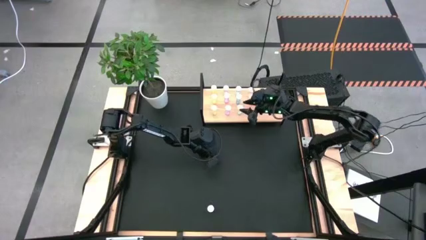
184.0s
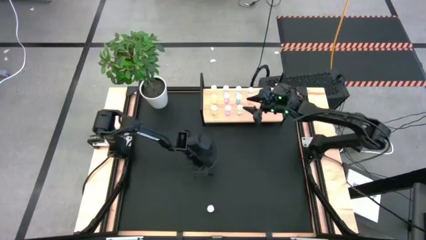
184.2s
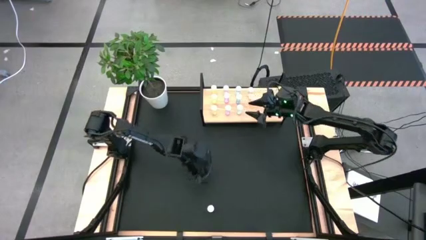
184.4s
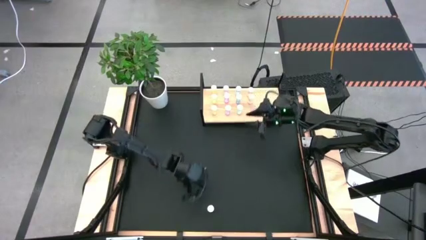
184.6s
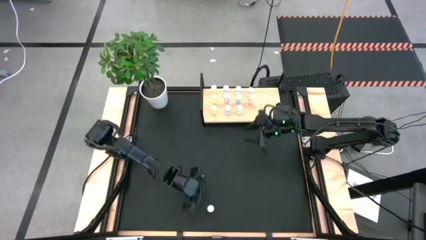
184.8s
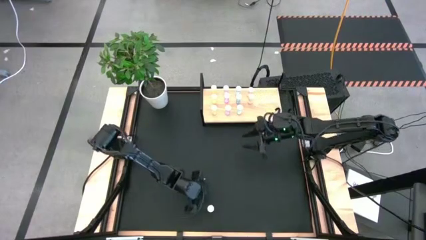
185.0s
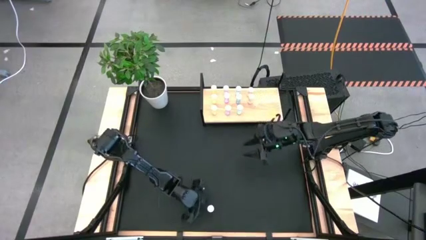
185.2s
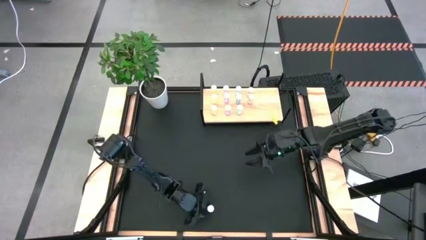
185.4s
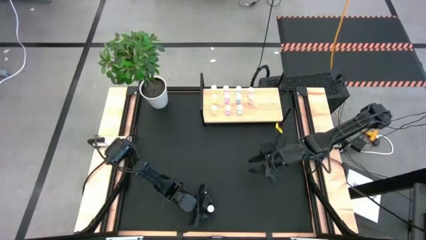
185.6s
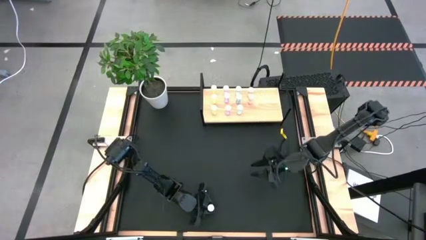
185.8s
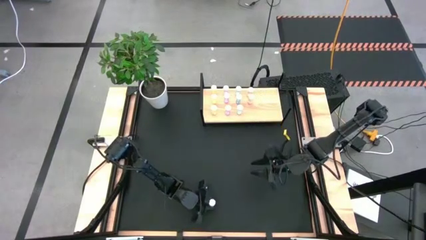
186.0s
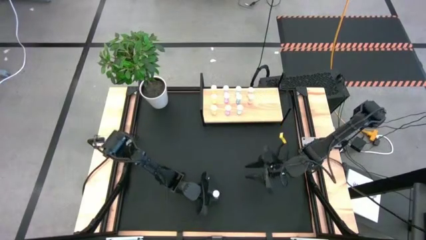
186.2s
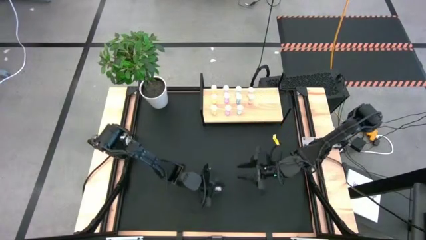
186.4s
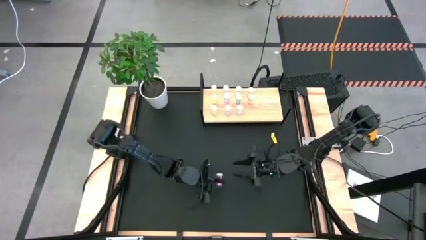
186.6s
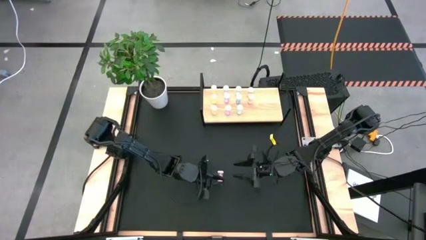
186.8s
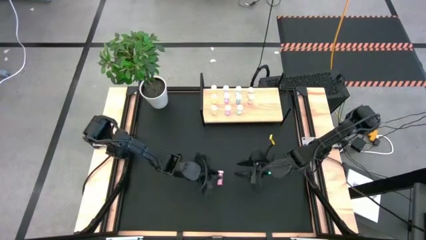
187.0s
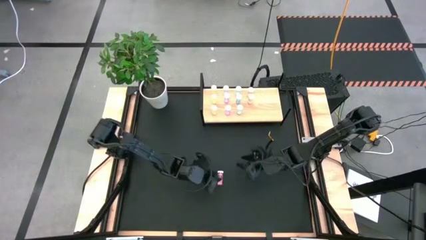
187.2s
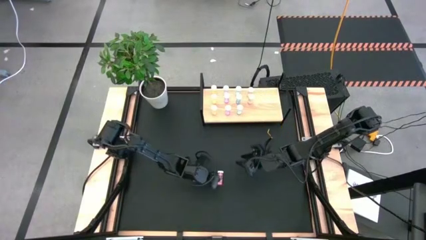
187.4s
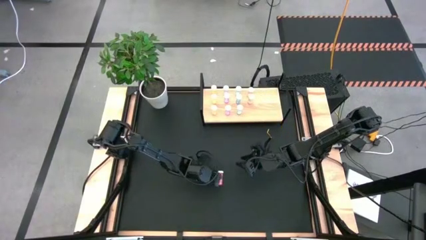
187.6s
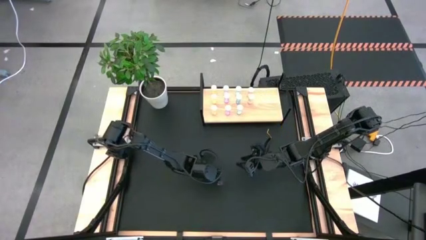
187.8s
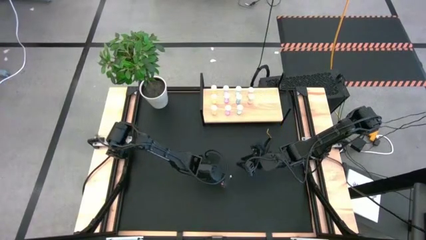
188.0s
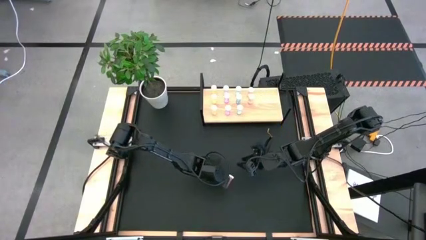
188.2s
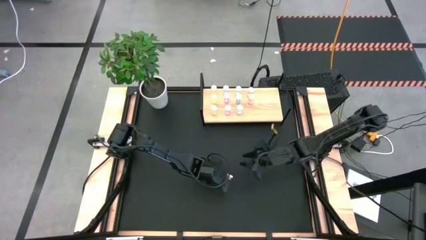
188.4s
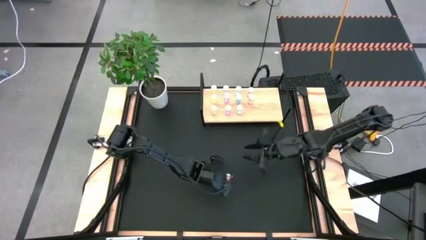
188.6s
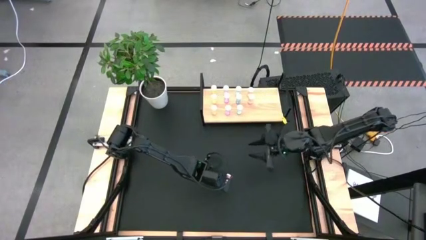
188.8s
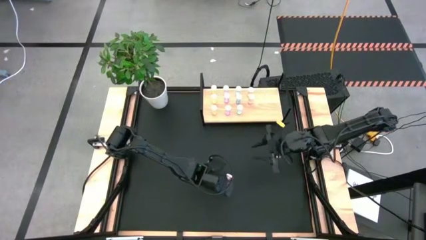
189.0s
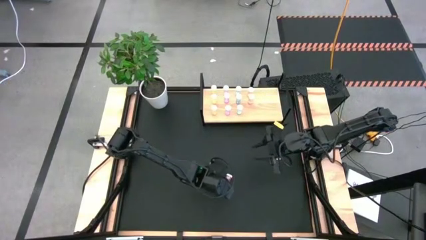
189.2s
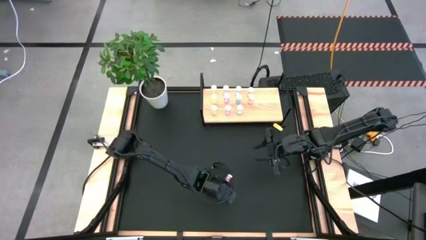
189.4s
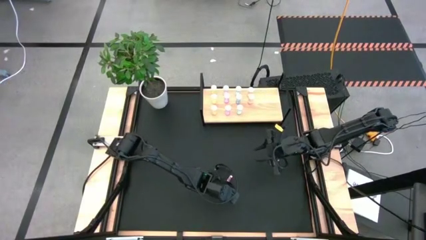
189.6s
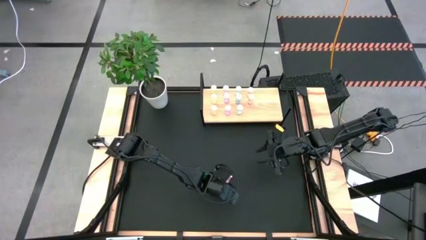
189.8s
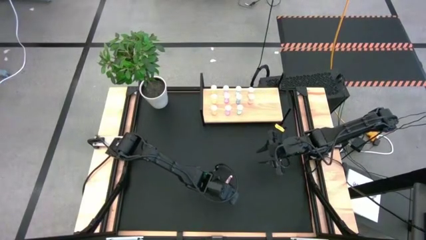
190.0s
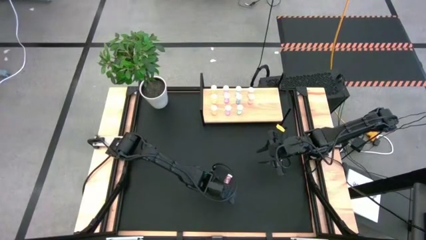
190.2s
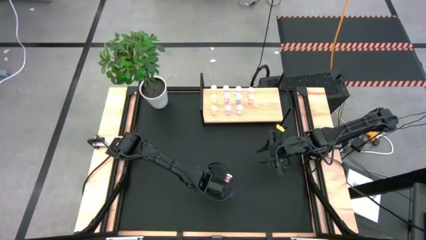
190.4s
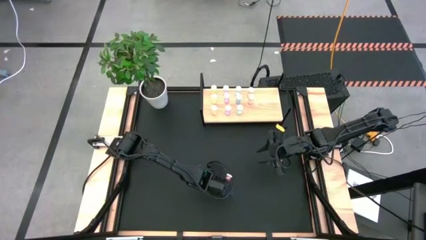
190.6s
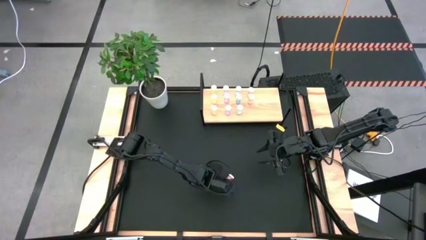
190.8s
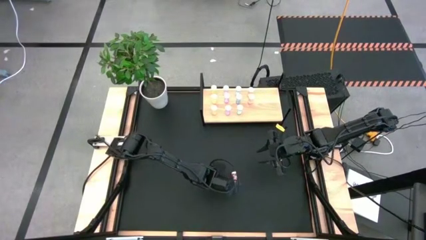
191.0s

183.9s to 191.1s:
Task: Pick and place medicine bottles onto shelf by color
Put the orange pill bottle on the shelf aligned with the other orange pill bottles

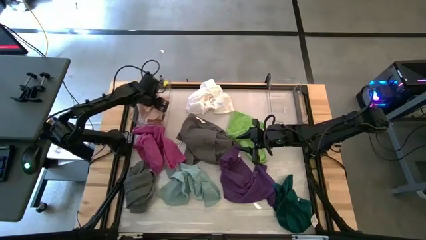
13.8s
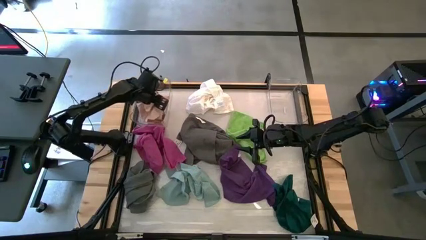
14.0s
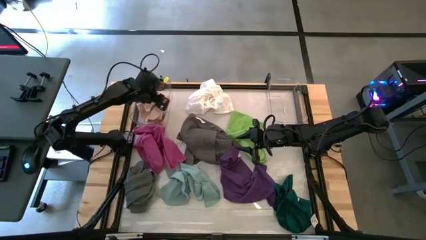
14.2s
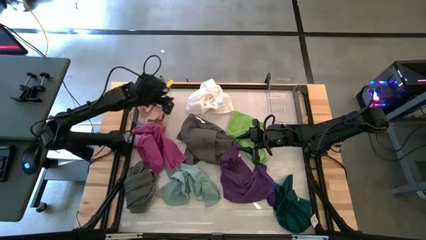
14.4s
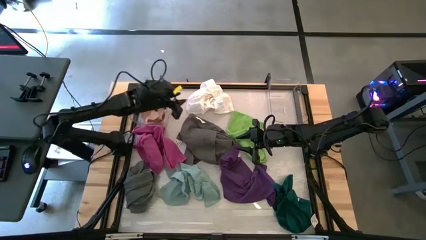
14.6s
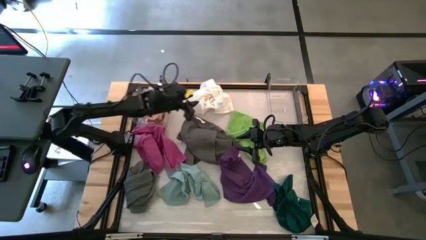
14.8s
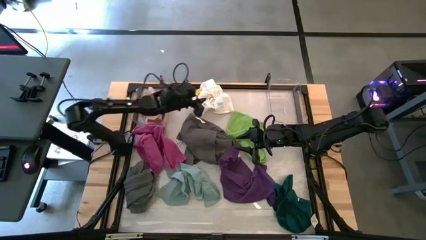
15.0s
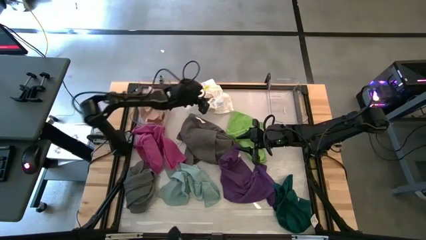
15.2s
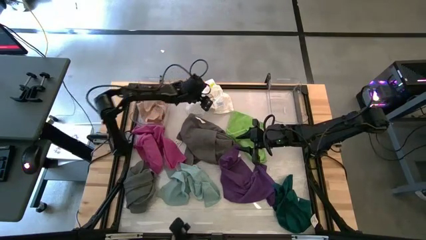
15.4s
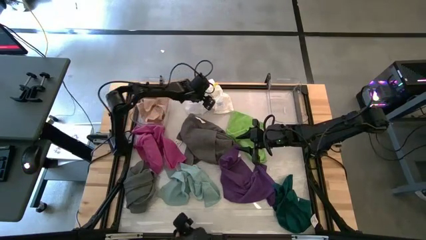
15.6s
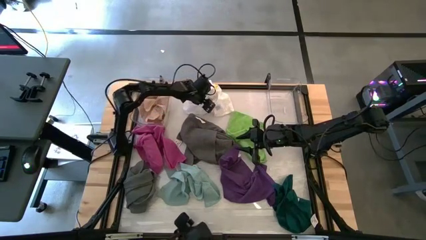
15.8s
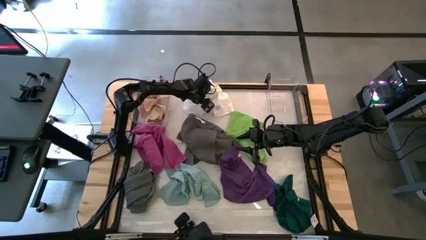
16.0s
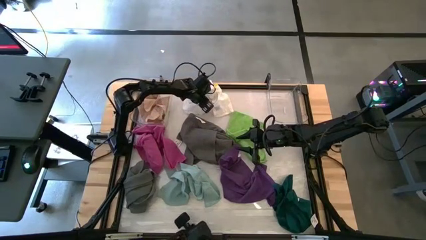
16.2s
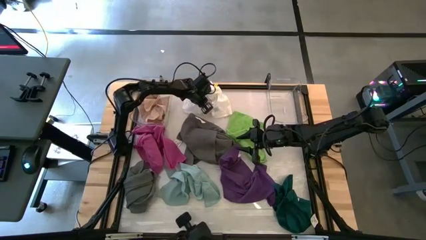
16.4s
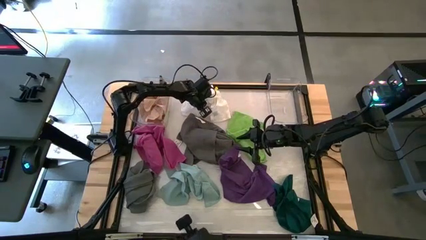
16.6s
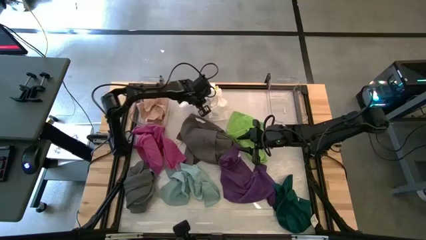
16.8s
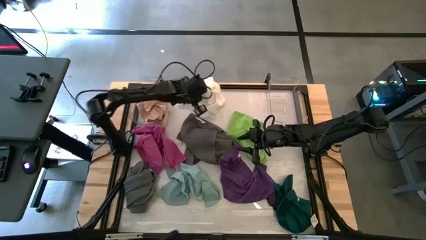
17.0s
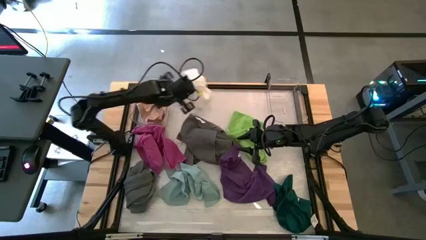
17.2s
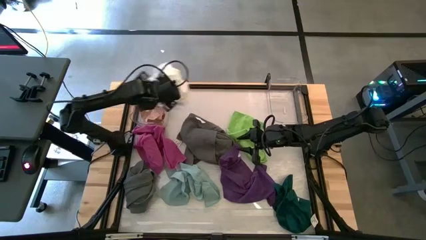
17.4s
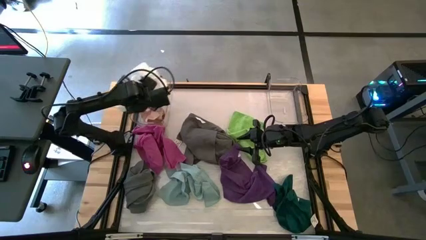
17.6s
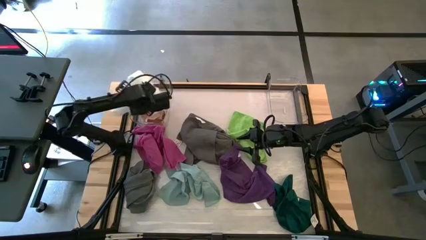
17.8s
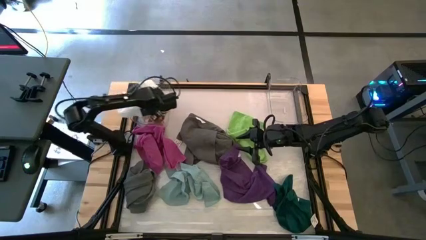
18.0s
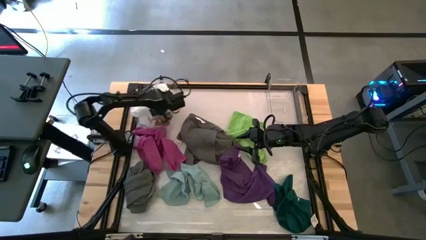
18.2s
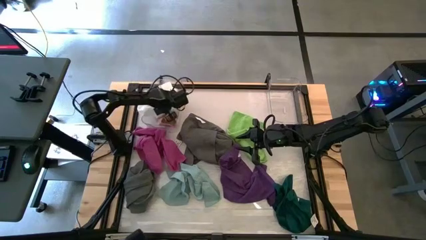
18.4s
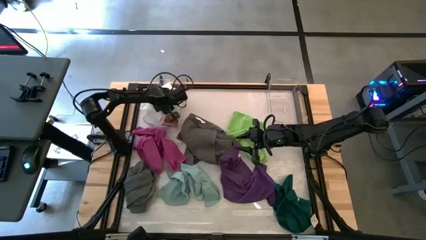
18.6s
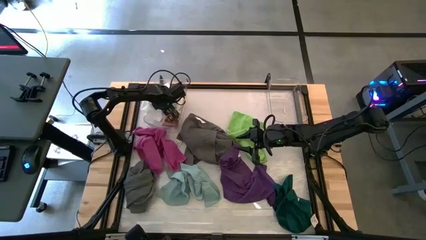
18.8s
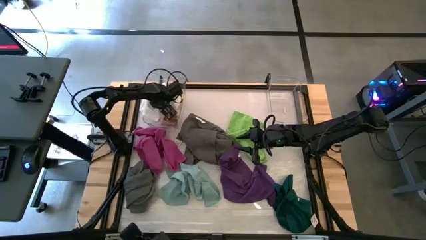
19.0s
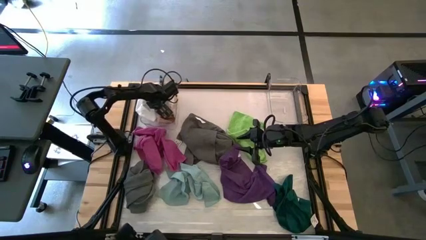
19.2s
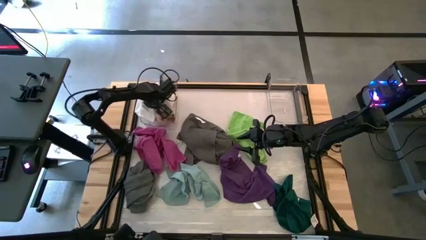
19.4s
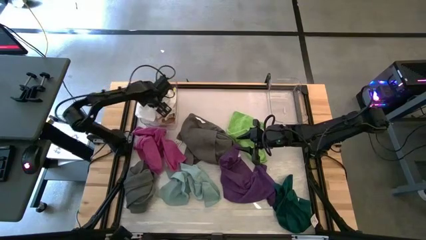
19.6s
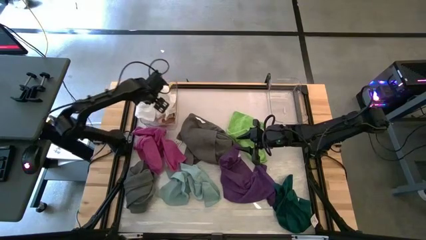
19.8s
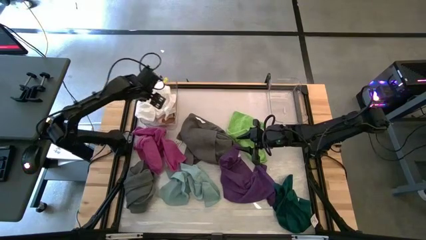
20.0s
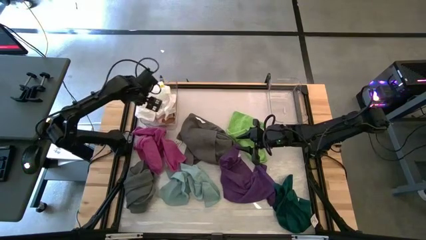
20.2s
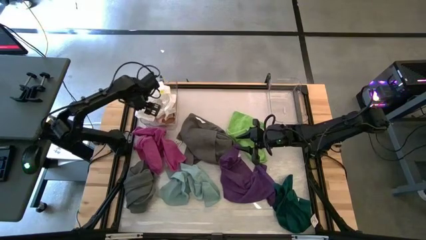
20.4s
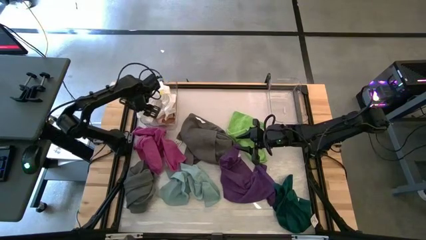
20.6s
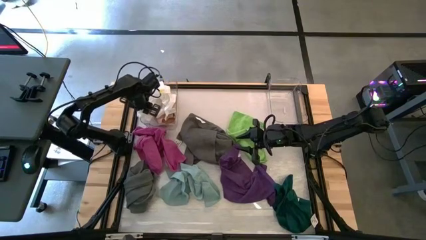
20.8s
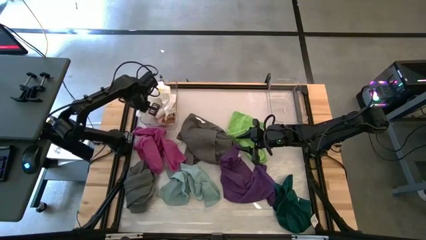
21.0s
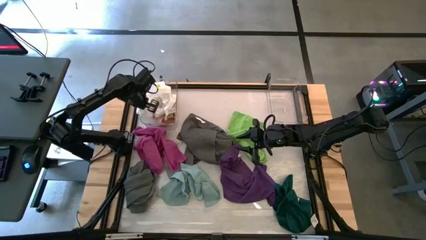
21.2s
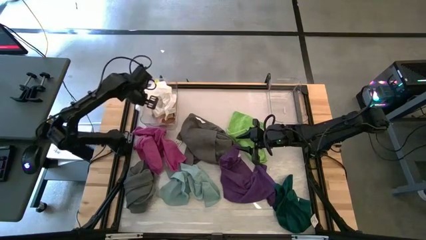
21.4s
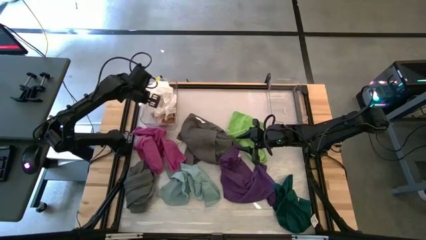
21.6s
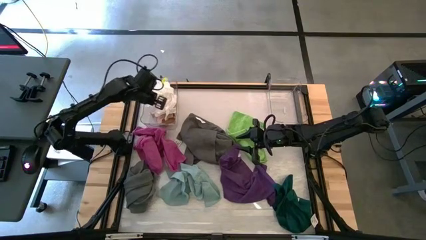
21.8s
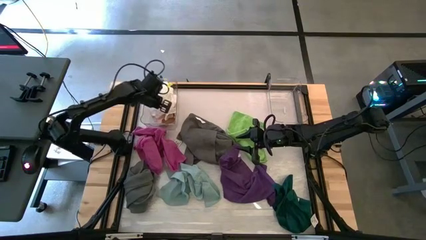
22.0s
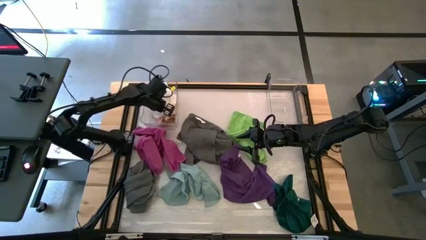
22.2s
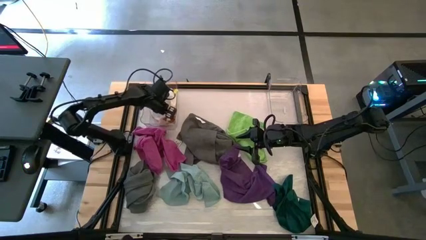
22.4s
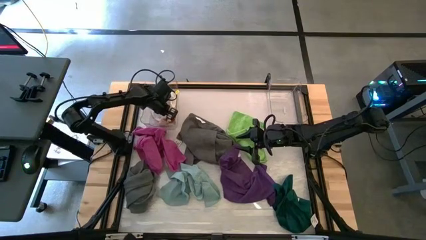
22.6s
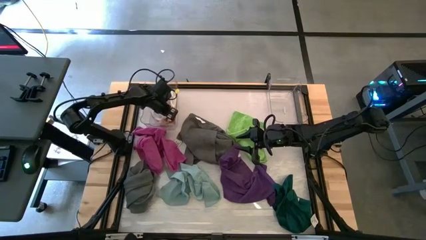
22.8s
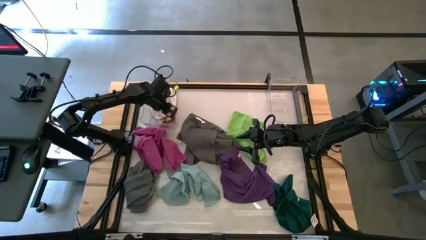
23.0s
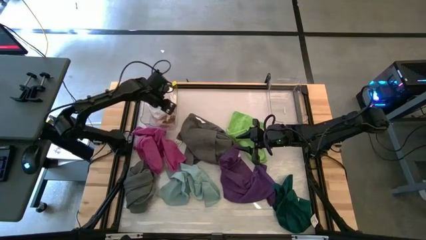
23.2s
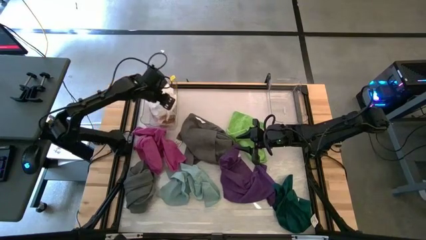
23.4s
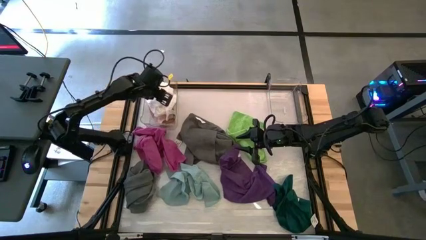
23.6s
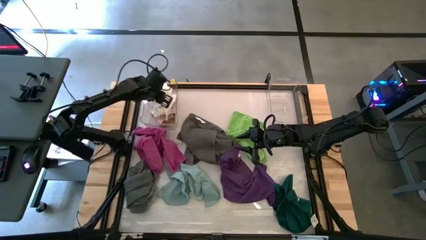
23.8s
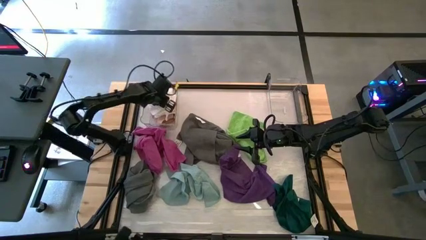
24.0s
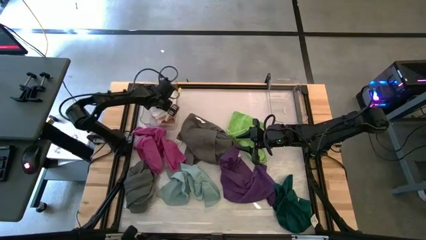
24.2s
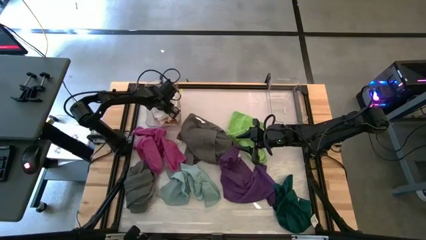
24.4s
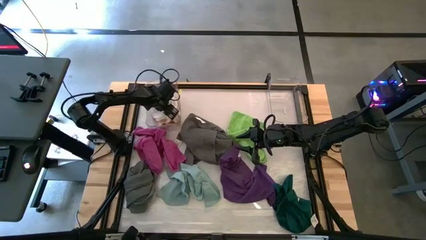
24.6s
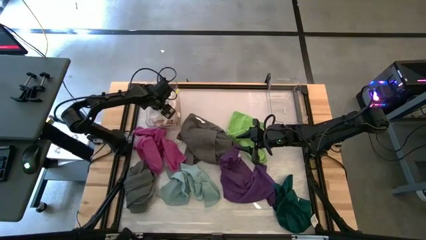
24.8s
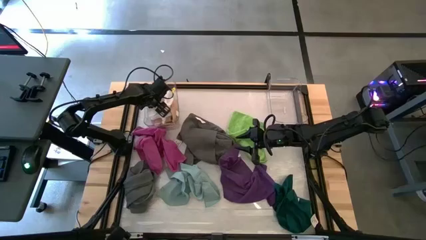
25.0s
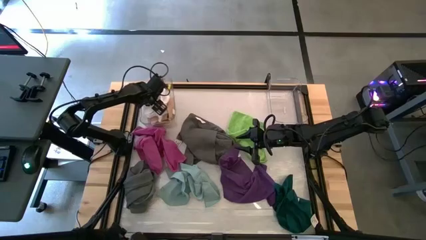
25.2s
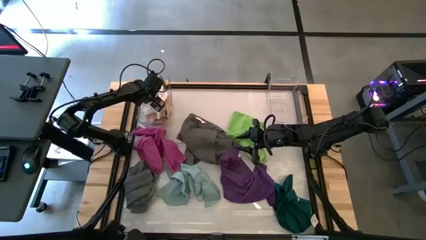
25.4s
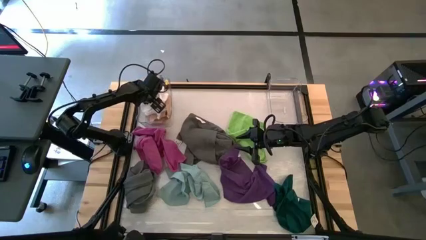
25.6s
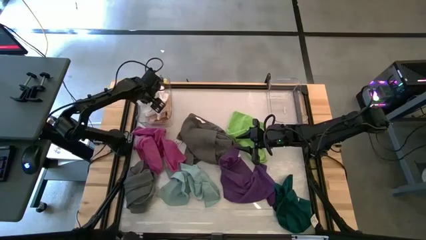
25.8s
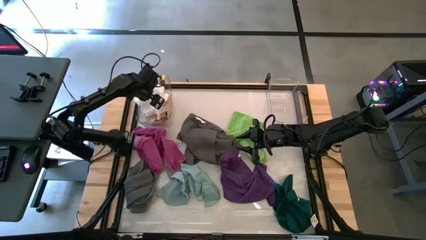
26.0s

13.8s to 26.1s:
Task: Sort towels by color in basket
Put the white towel into the left transparent bin
